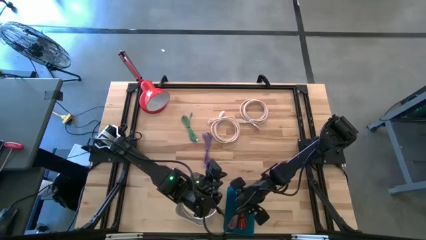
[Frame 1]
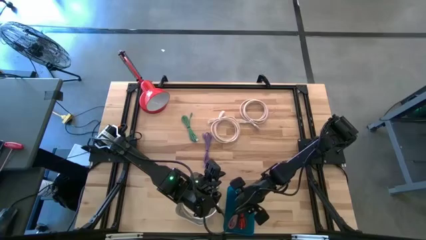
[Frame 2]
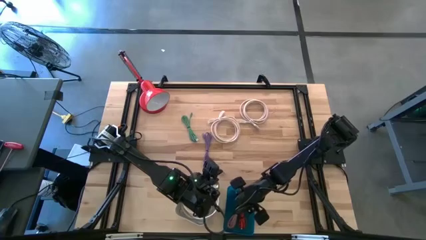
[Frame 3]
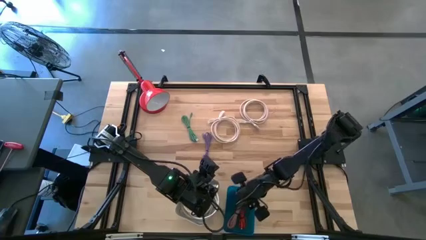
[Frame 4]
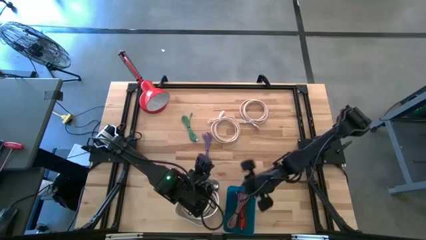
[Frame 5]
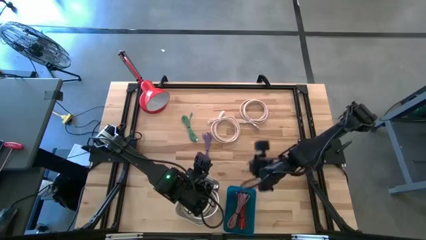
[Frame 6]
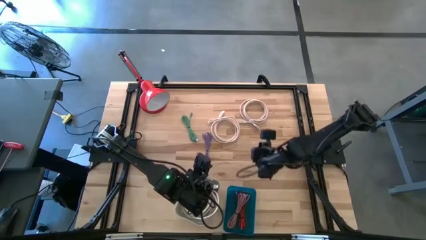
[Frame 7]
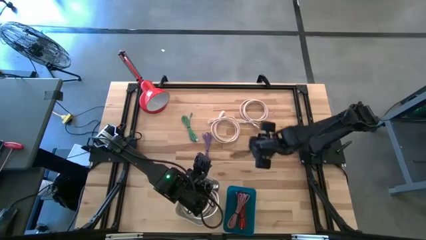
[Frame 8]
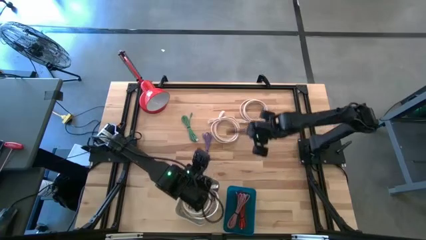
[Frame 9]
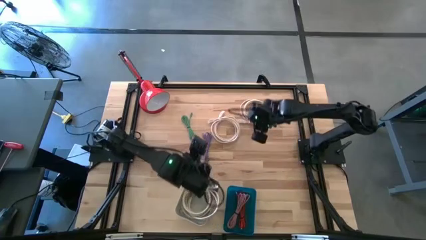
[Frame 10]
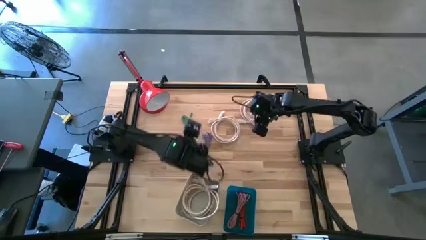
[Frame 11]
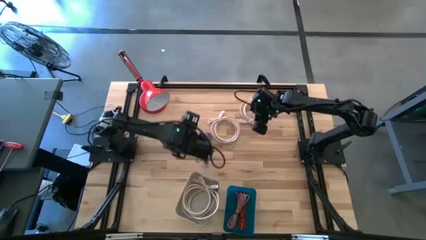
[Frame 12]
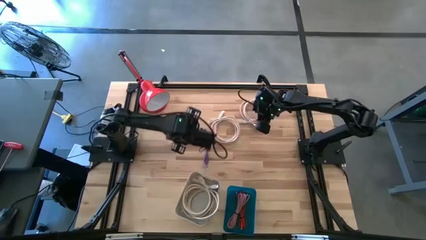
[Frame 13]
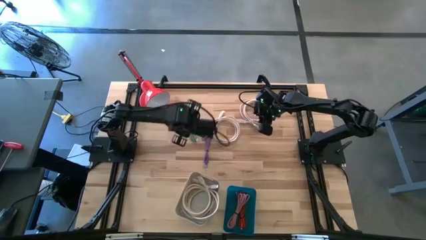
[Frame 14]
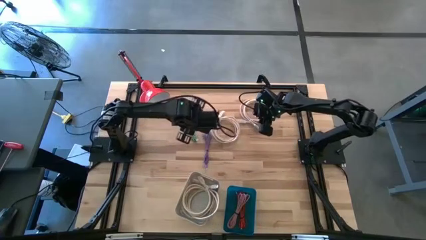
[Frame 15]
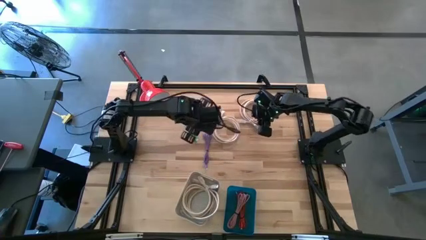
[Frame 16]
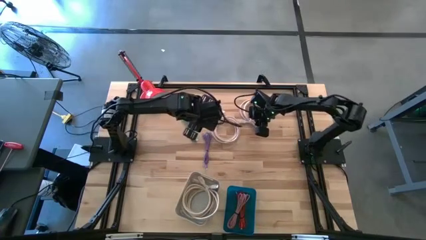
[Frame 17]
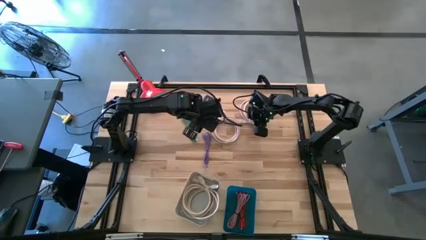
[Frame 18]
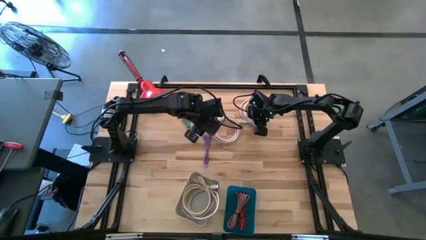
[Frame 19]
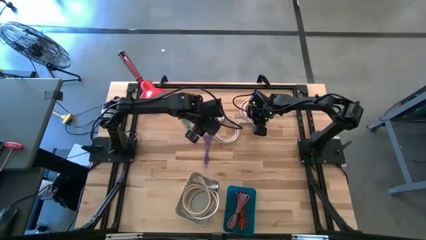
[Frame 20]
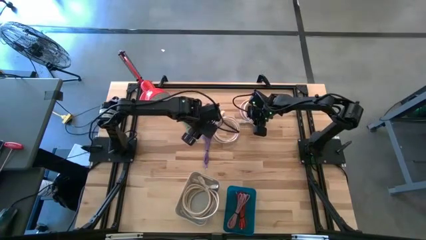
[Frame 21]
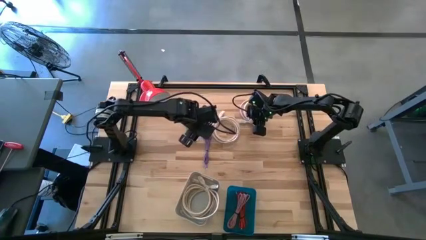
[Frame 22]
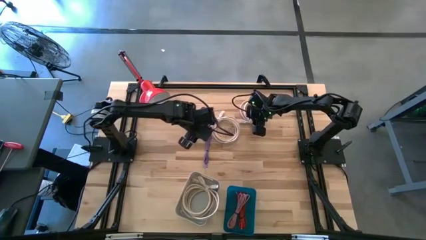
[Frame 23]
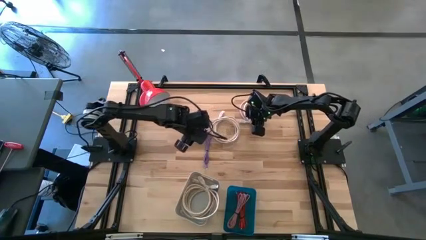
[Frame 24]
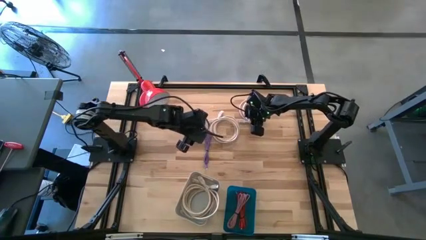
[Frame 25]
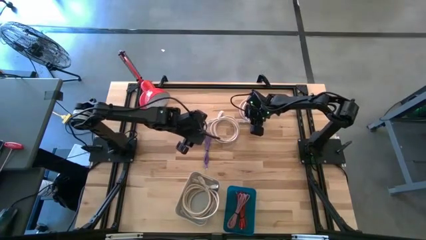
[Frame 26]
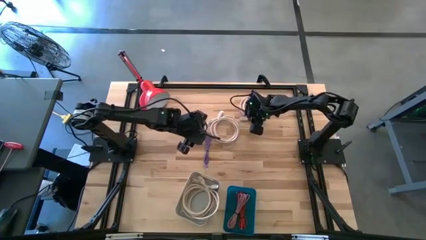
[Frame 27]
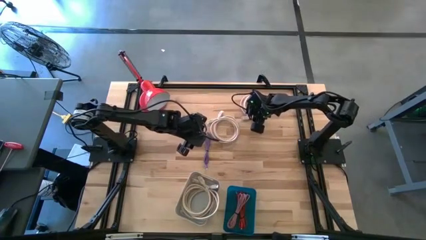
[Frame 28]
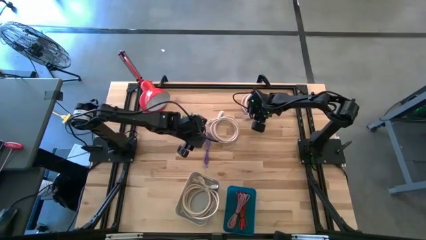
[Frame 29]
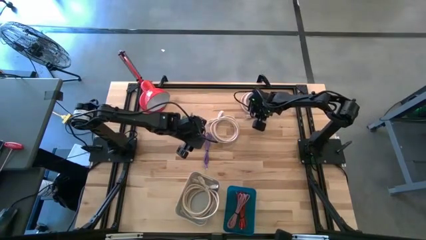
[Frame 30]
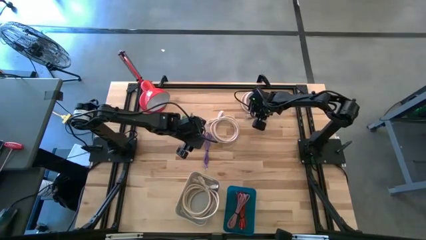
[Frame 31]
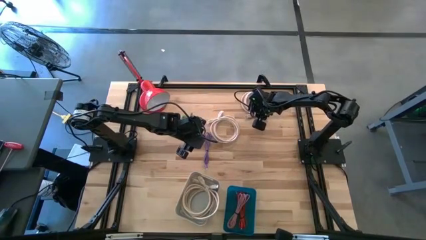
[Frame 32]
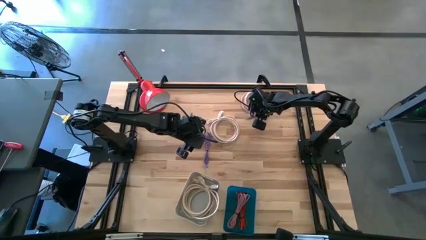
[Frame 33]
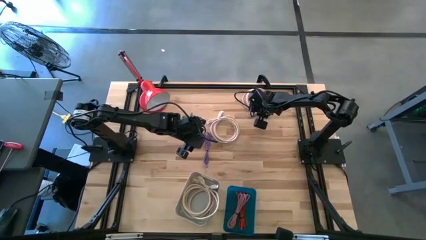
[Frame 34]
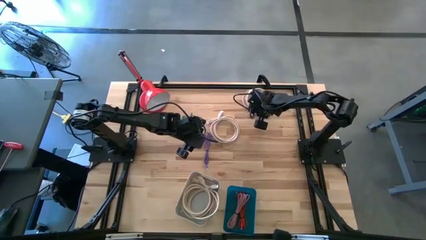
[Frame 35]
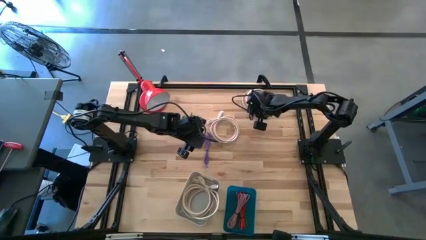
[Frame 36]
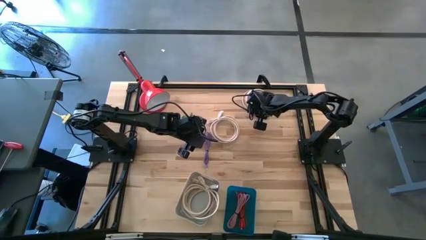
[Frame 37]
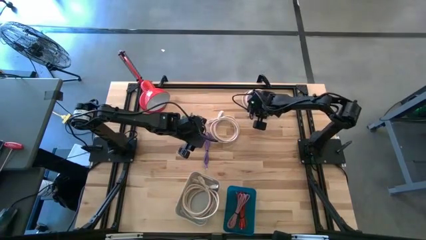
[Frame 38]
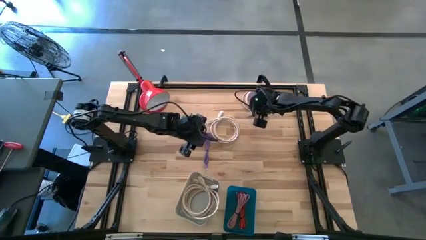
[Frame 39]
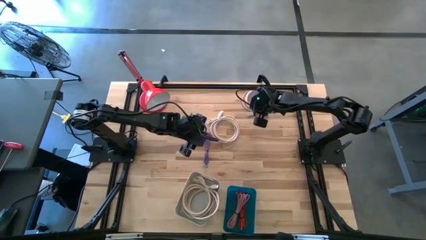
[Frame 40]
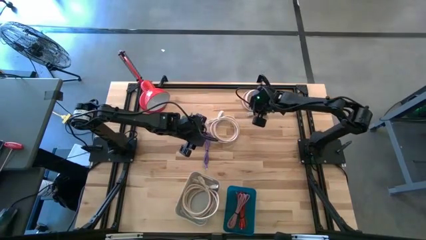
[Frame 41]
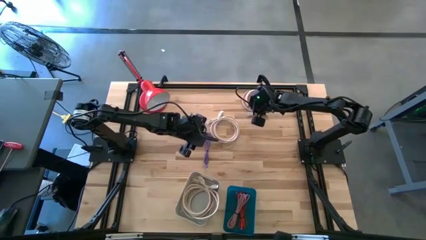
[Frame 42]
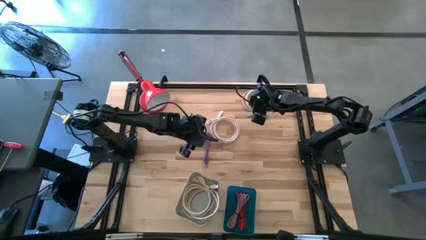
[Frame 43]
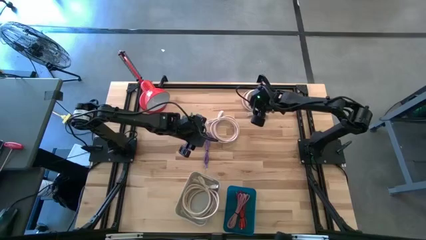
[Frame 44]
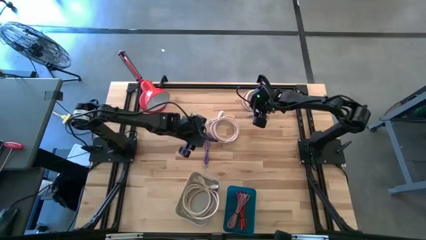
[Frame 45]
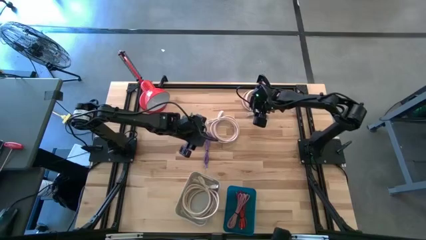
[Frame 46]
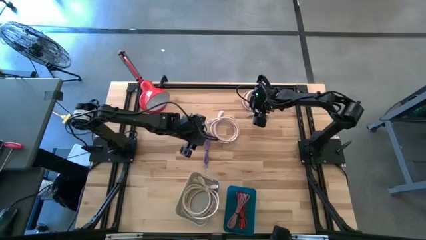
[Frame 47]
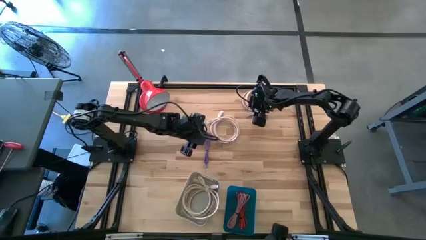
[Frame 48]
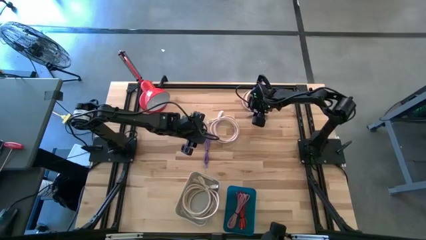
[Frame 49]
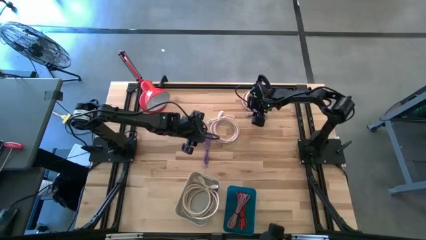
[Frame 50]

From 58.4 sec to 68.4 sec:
Task: Pick & Place USB Port
Put the light brown HDMI cable into the white bin

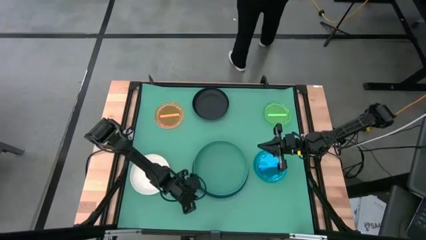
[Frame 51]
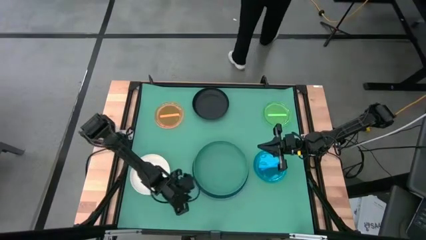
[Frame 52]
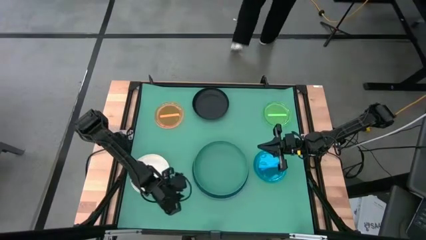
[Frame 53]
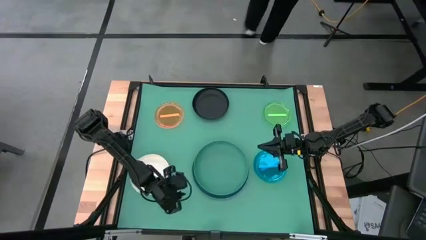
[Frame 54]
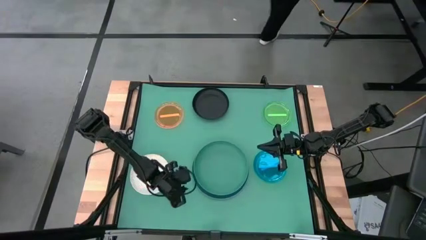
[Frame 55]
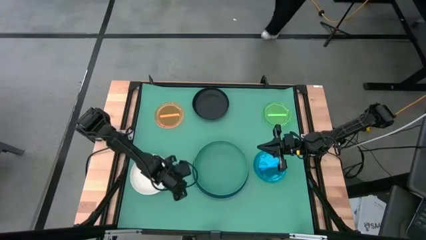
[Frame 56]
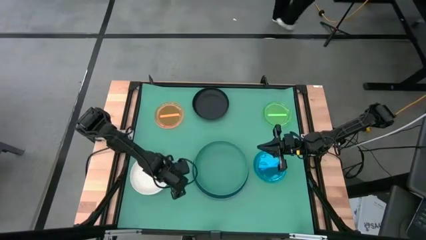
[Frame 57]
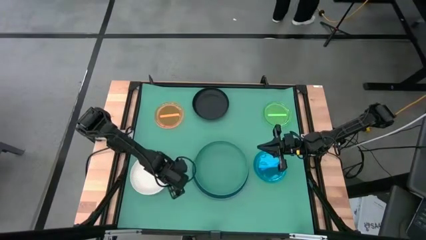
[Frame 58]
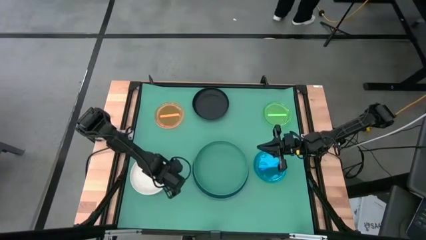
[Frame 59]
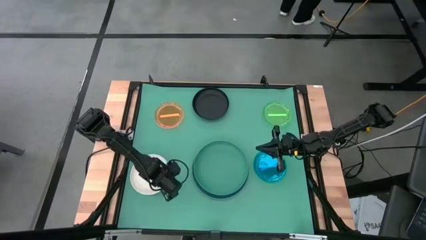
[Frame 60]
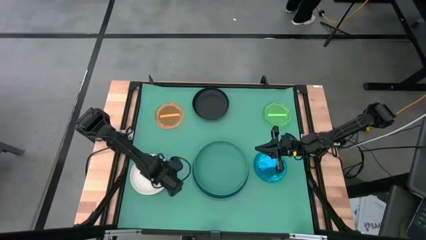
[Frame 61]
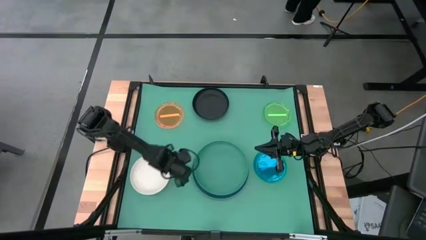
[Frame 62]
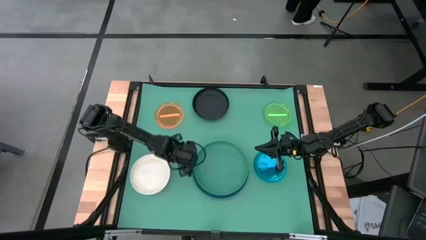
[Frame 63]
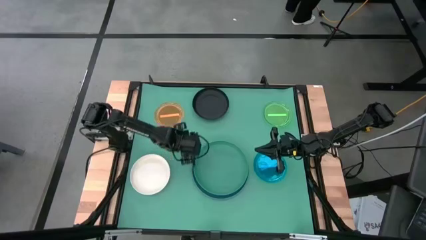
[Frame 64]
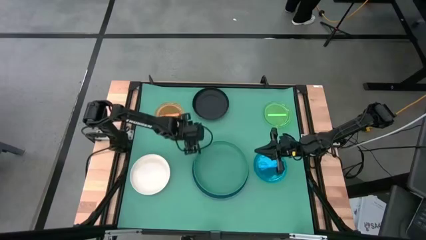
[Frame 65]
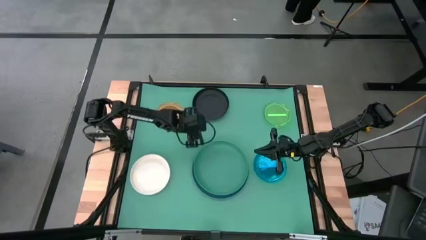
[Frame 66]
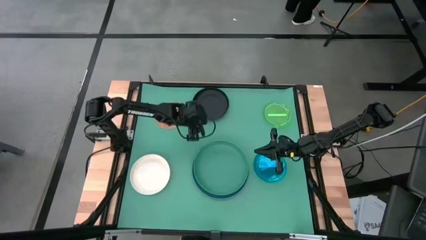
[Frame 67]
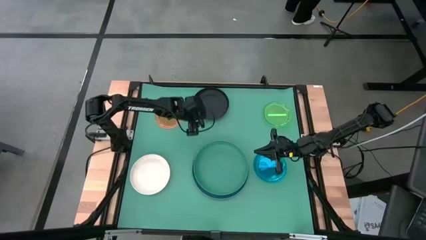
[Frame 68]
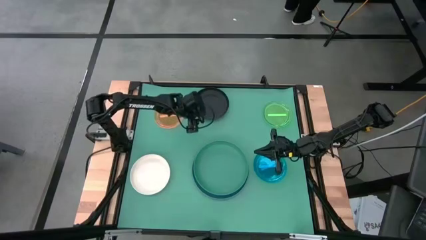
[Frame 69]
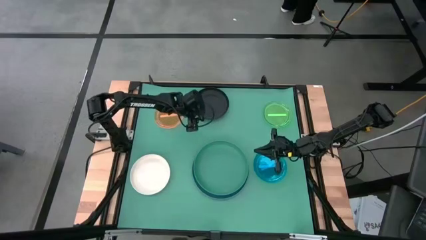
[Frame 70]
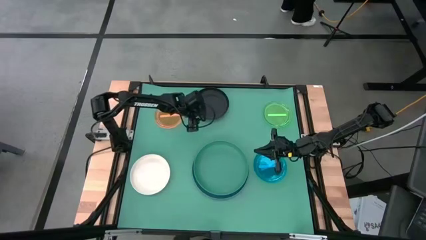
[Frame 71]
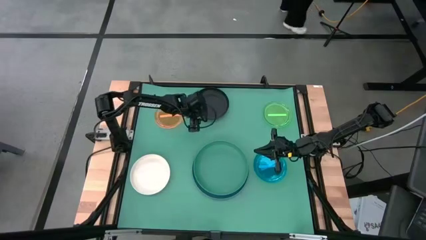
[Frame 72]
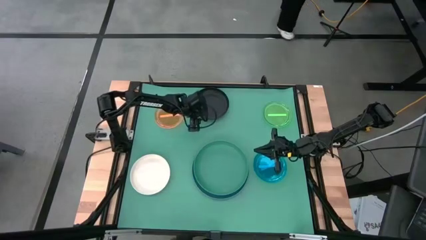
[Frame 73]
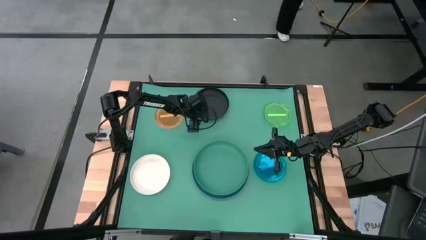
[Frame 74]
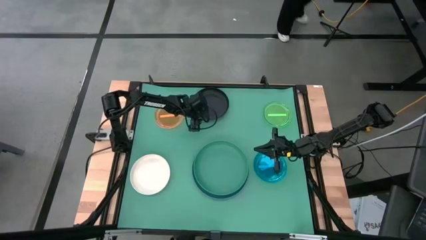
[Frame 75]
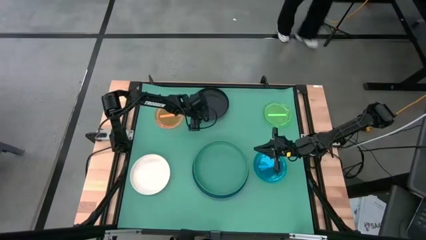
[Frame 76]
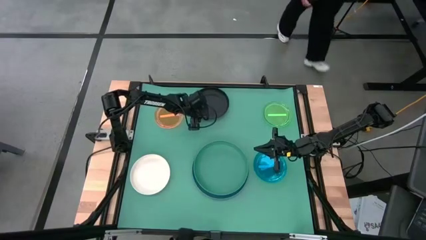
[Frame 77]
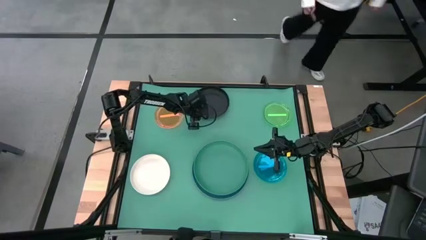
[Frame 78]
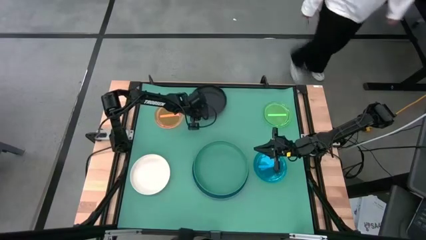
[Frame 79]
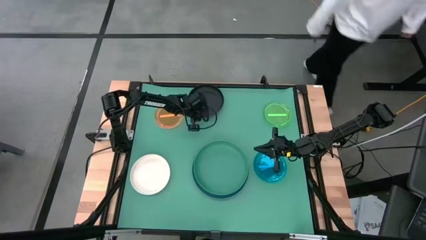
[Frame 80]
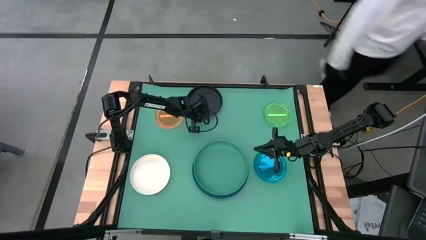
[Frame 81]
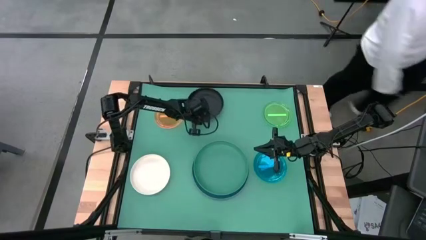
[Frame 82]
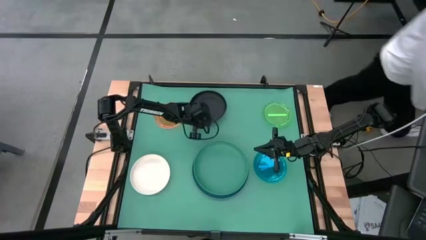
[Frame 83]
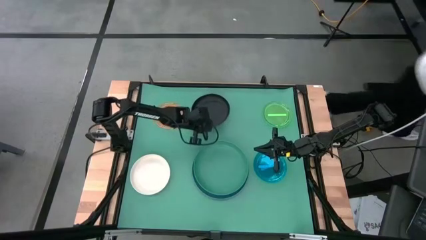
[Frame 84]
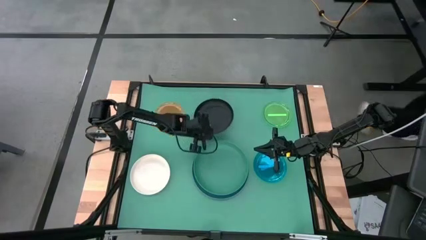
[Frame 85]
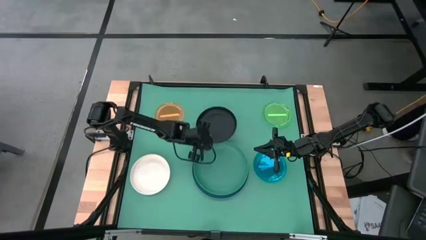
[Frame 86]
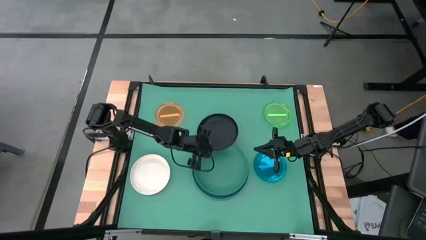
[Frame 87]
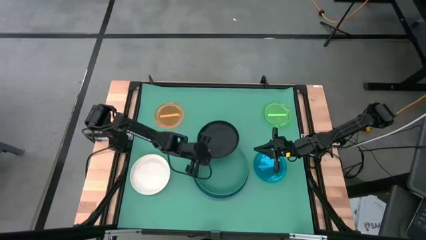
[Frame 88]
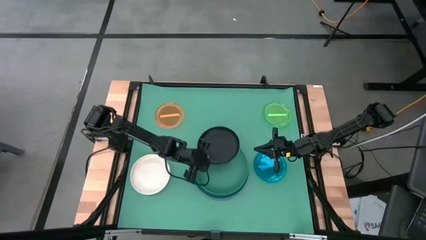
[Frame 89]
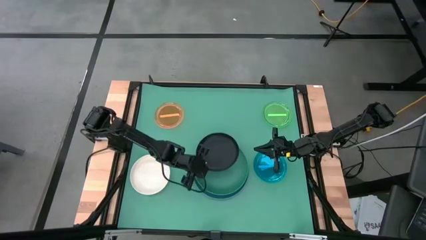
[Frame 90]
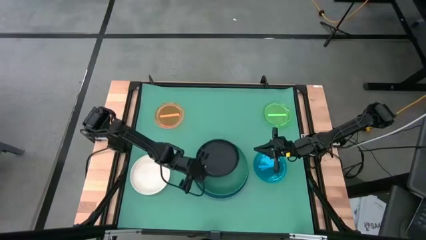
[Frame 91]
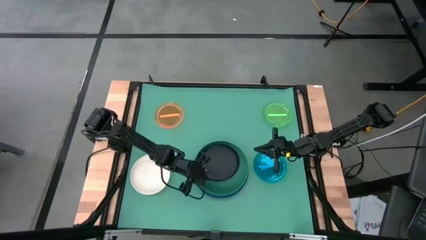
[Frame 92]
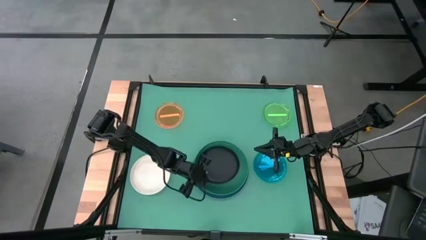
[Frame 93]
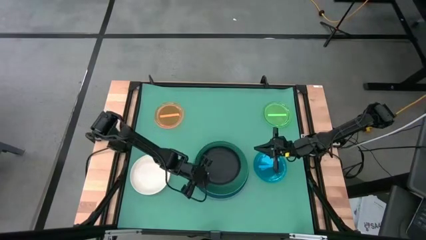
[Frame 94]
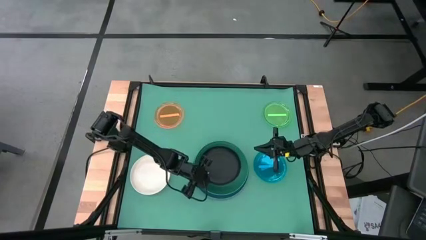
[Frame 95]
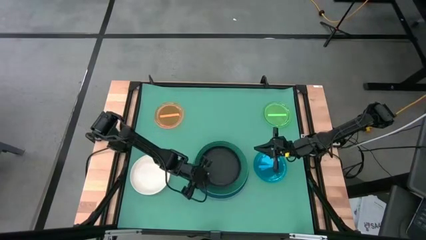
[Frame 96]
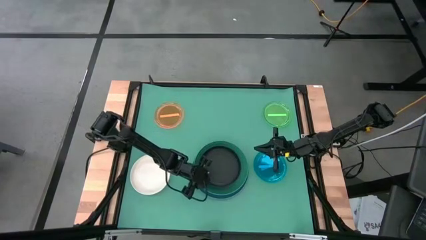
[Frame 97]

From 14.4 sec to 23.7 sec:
Task: Stack plastic plates
Stack the black plate on top of the green plate
